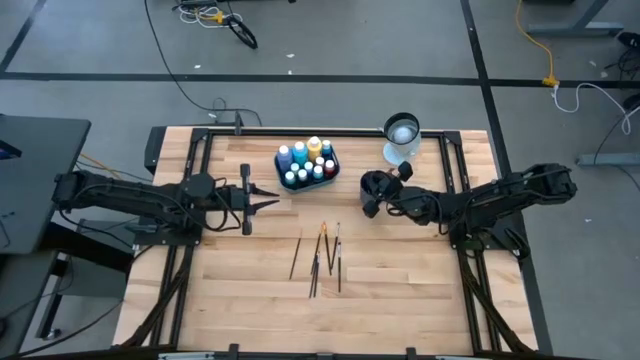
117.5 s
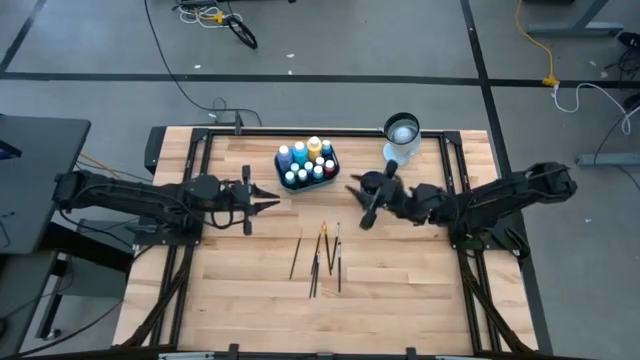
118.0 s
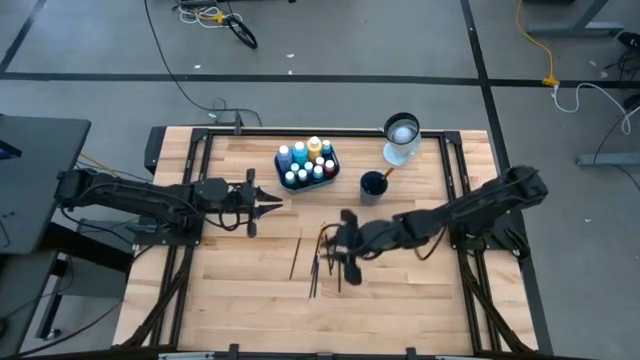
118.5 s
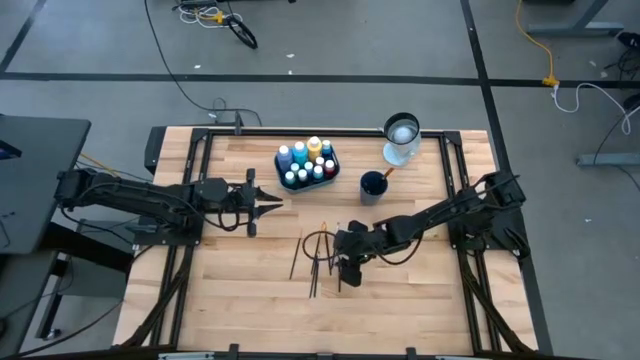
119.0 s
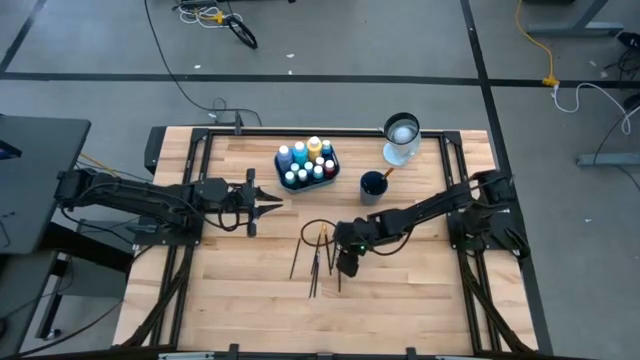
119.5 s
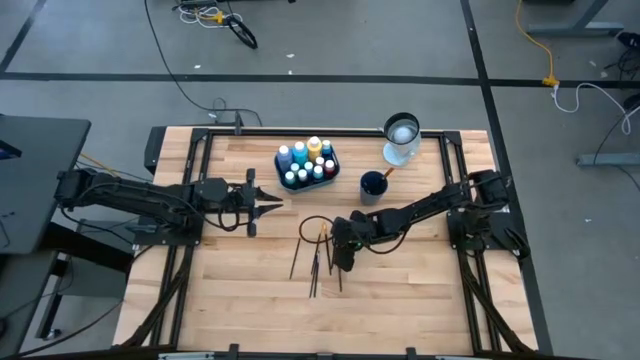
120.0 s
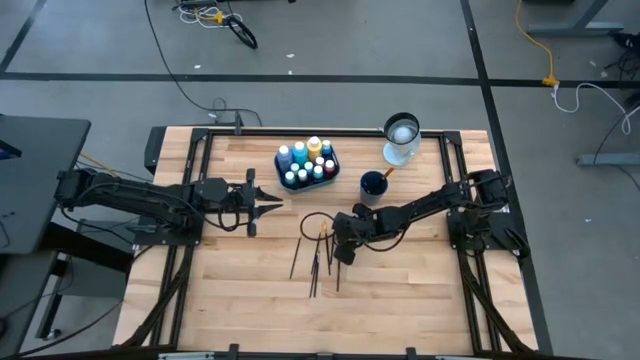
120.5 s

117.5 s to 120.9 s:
Task: Pick & Place Paint Supplies
Put the silver paint brush into the blue cup

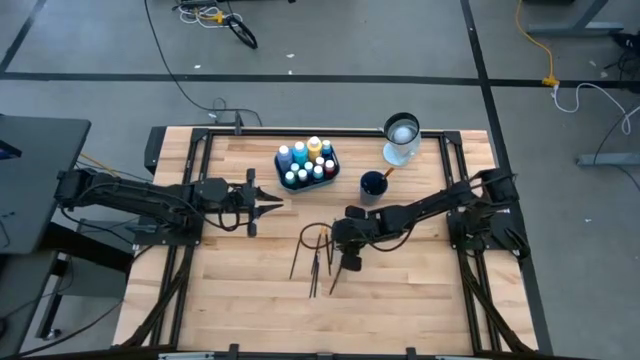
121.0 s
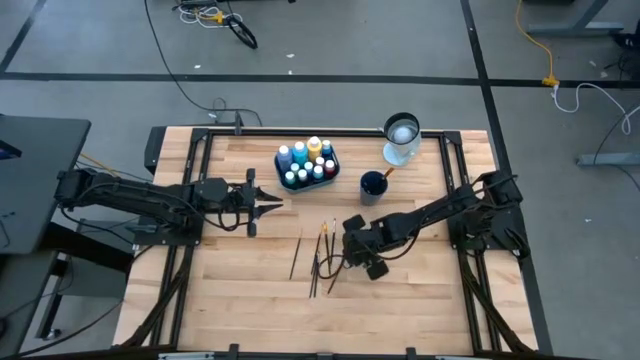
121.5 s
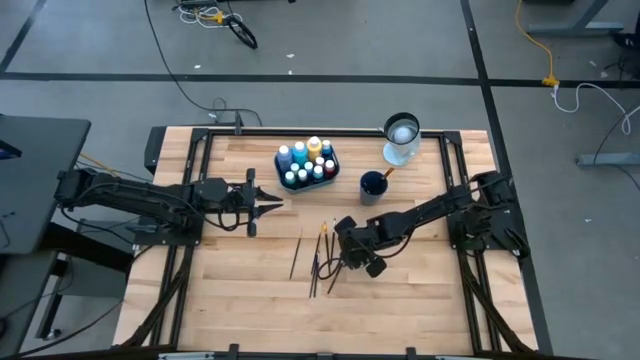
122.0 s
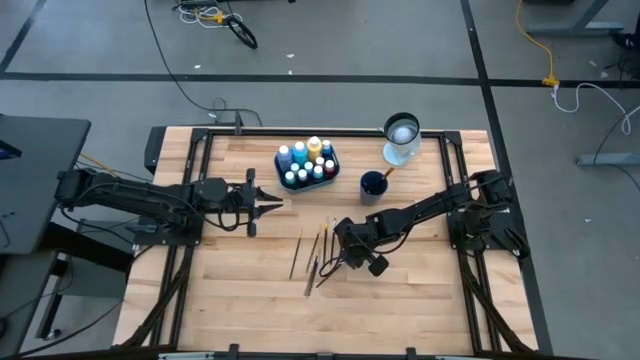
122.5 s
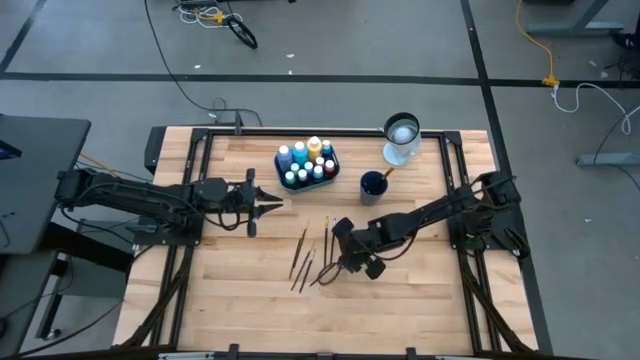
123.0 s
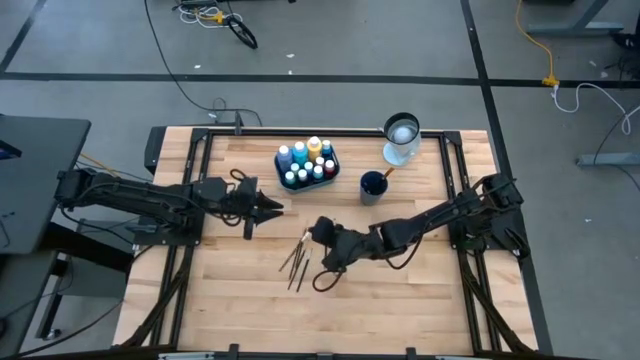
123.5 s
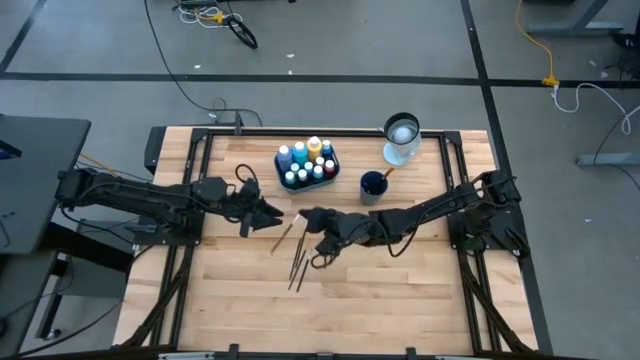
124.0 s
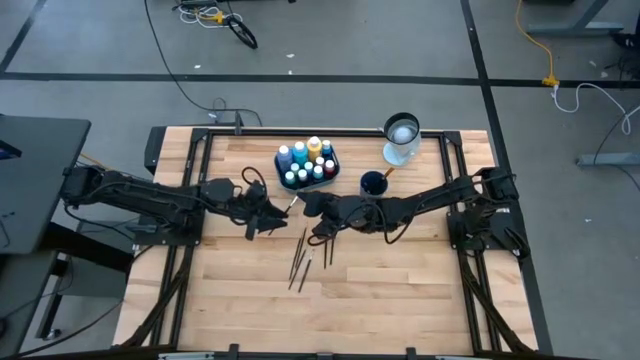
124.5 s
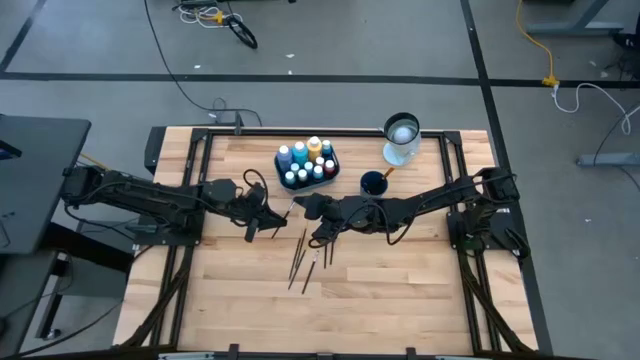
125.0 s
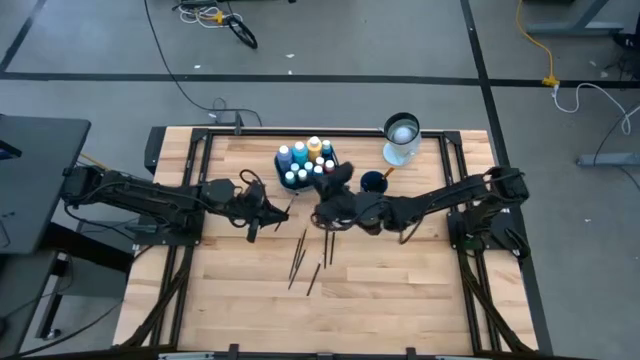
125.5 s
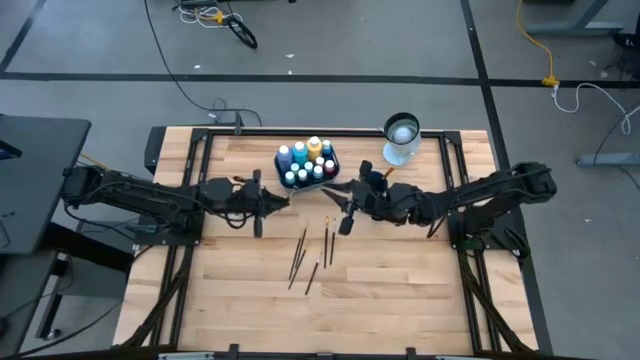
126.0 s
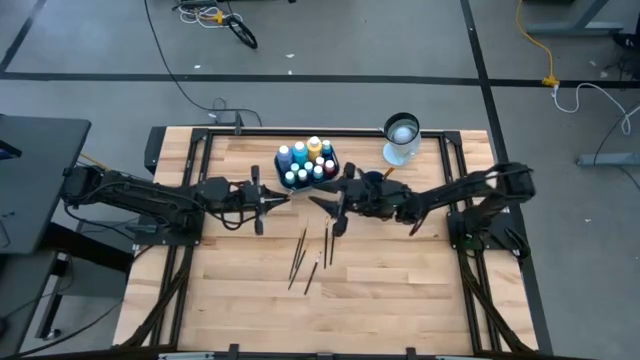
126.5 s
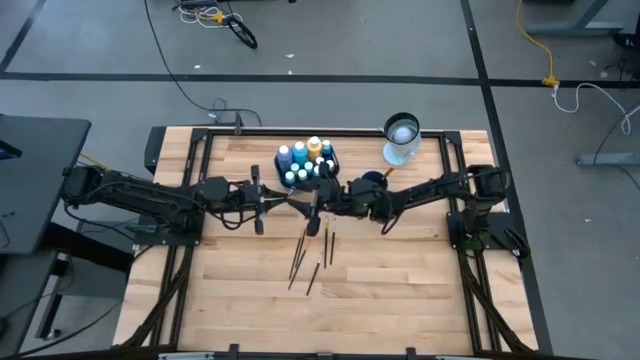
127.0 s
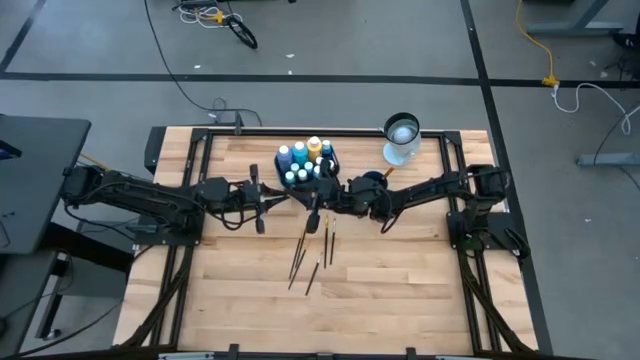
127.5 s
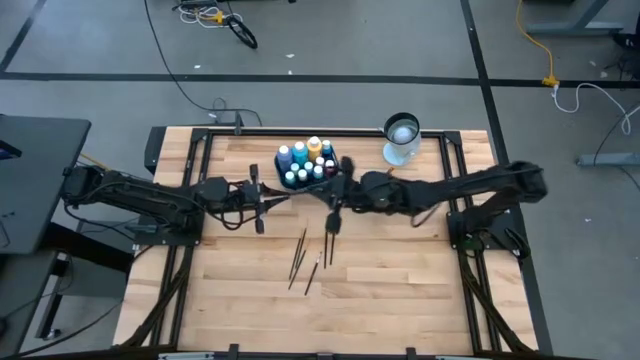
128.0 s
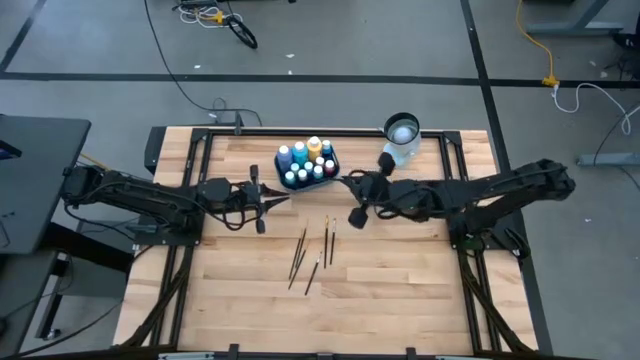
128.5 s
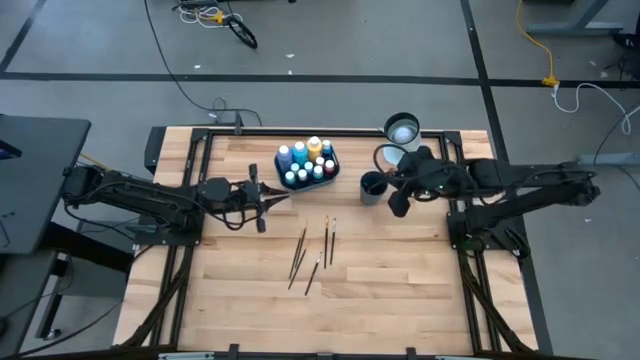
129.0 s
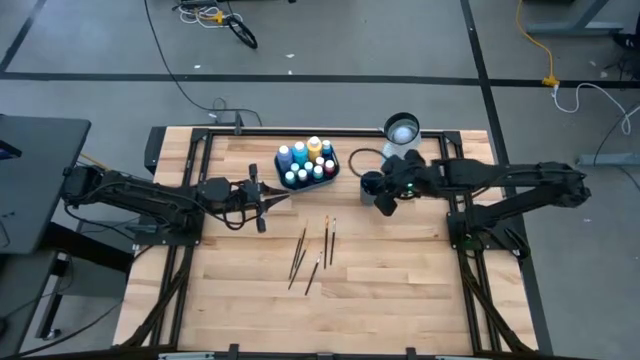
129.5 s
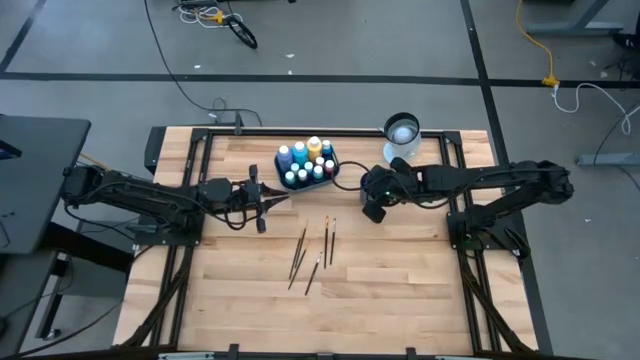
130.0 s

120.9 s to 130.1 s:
Put the silver paint brush into the blue cup

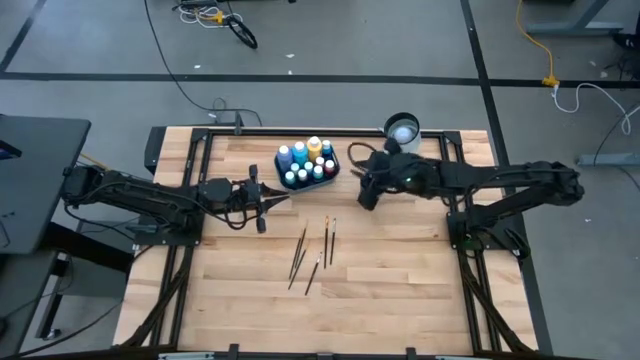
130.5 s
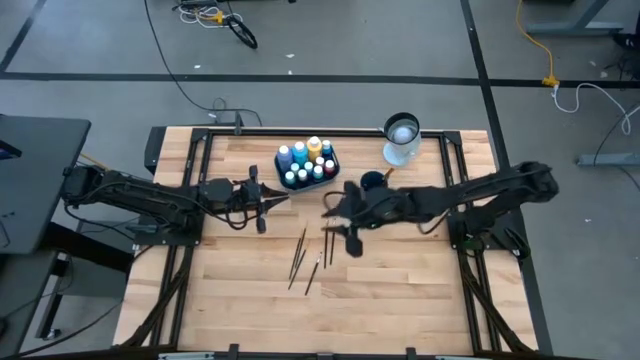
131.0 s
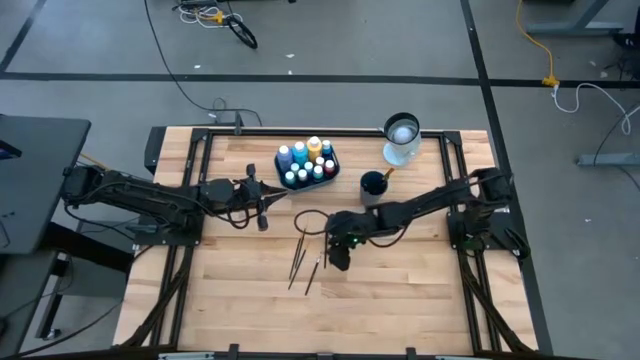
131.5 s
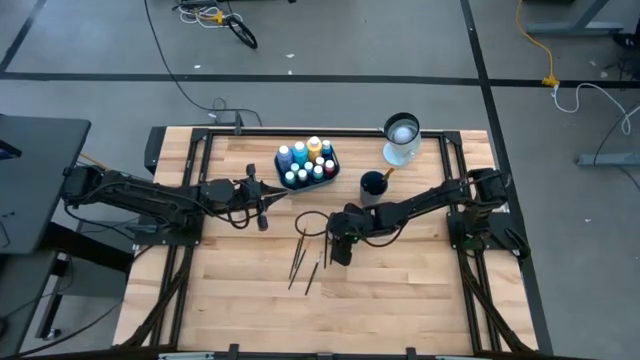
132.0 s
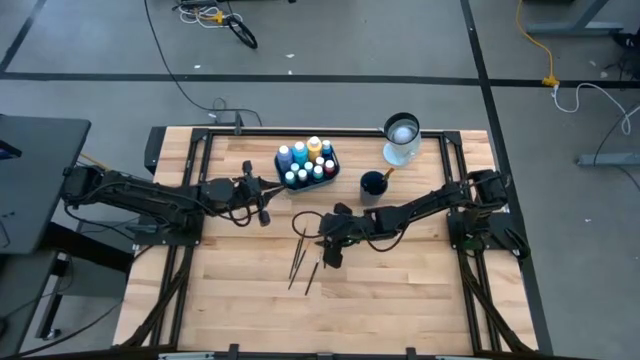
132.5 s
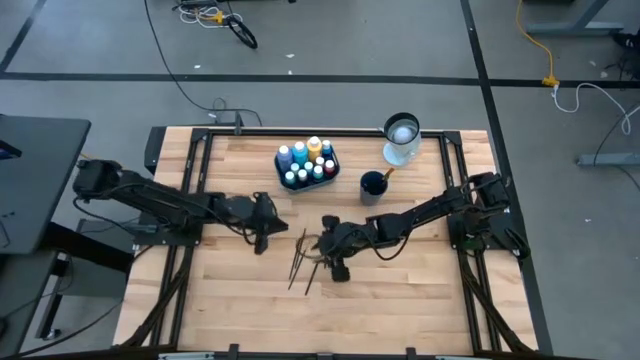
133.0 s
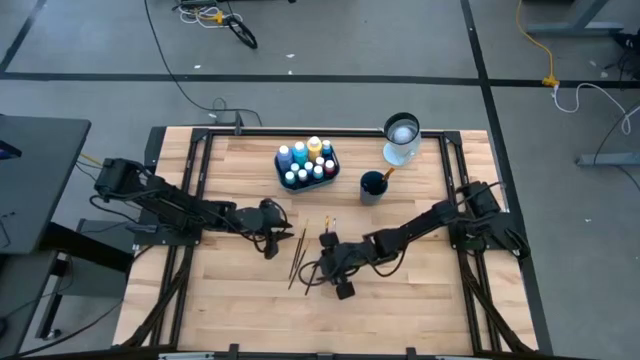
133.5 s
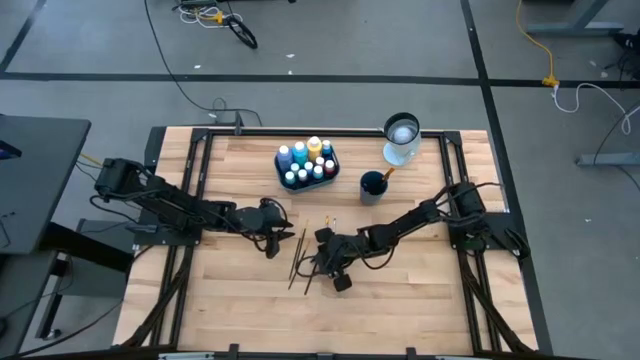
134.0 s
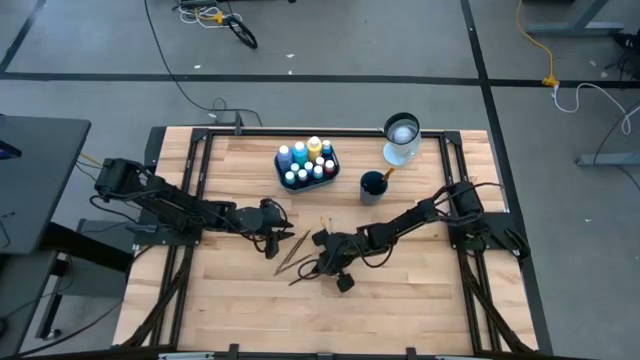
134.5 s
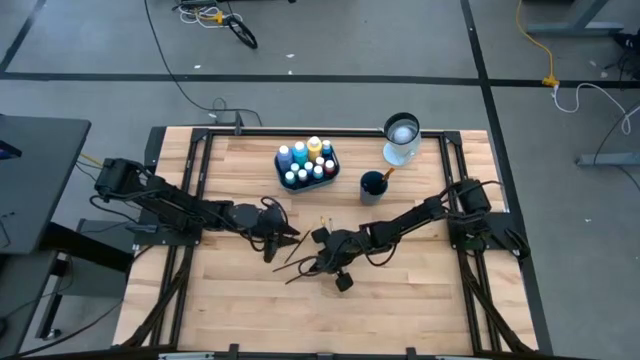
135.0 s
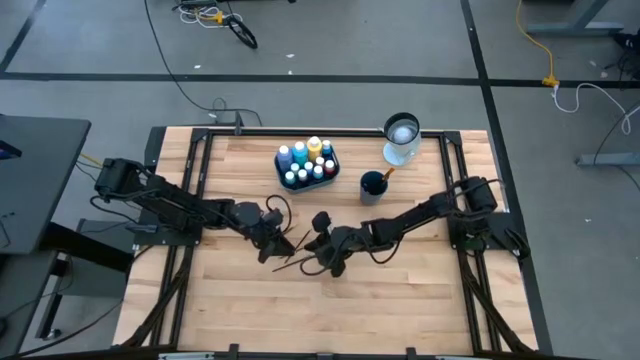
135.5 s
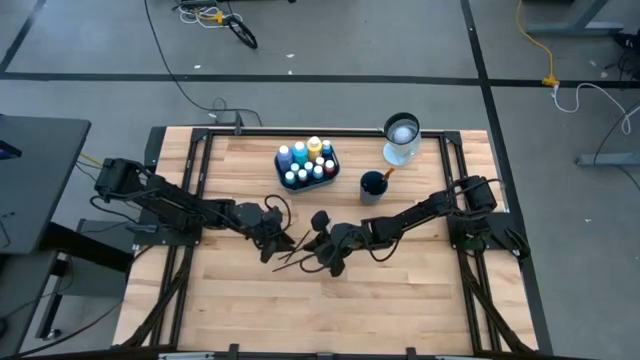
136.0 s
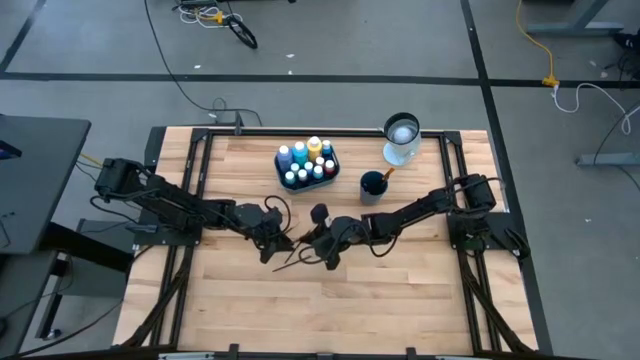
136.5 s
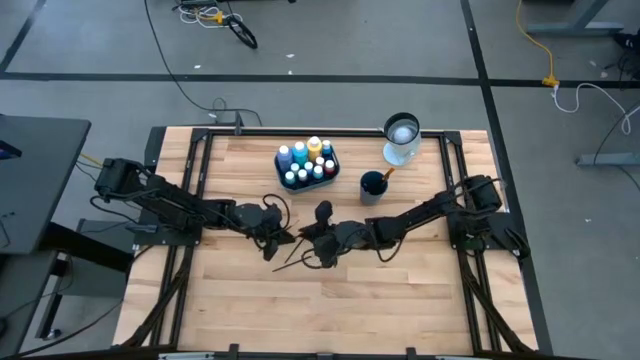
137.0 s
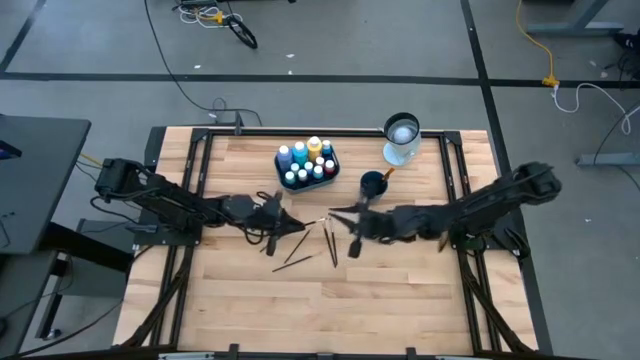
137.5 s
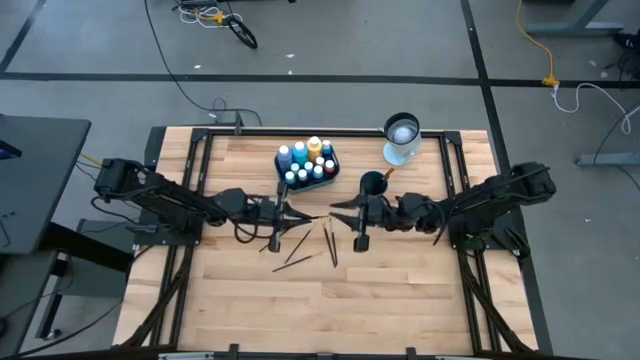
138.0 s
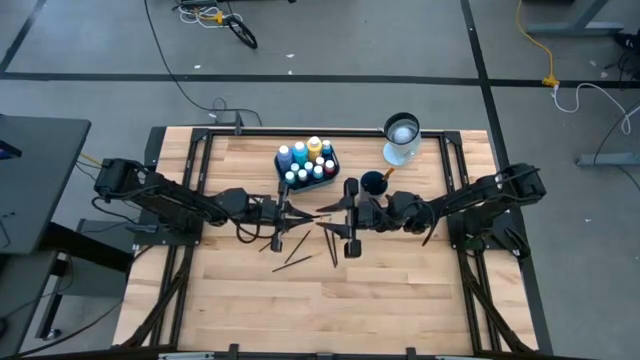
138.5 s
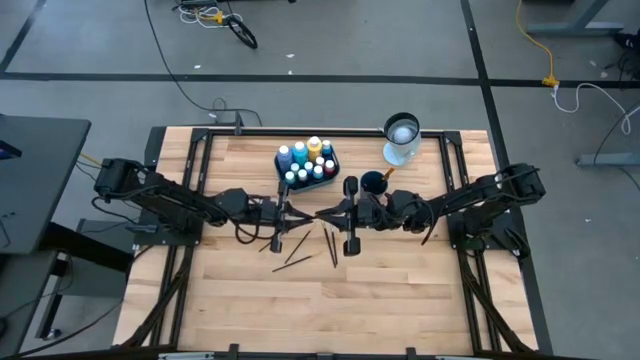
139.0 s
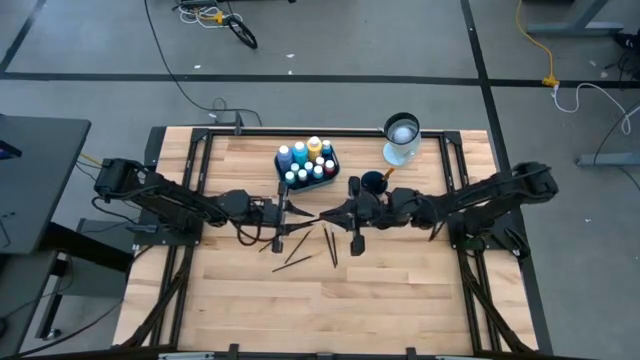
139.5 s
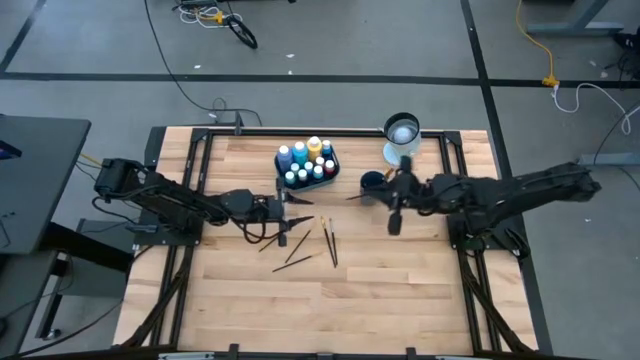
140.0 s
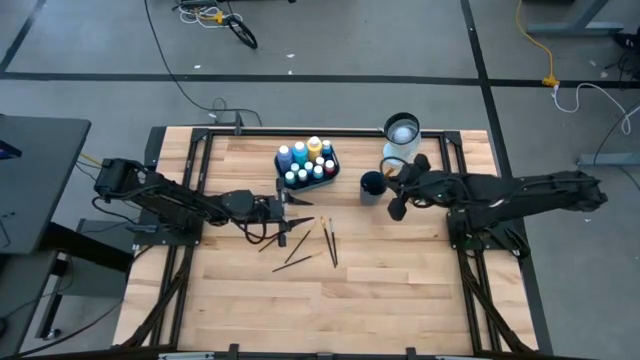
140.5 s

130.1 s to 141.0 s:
Put the silver paint brush into the blue cup
